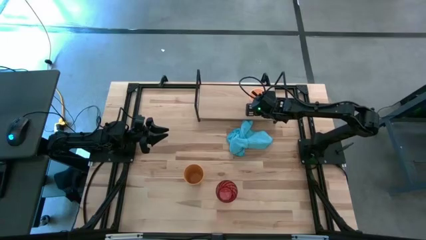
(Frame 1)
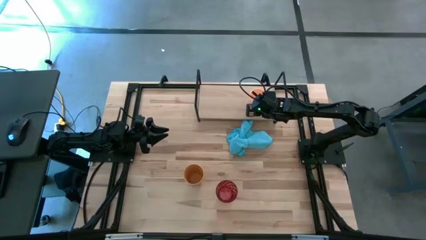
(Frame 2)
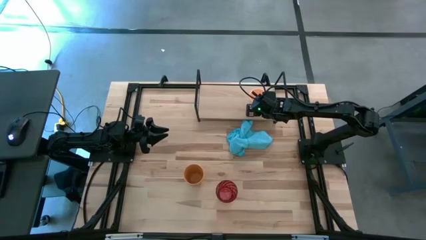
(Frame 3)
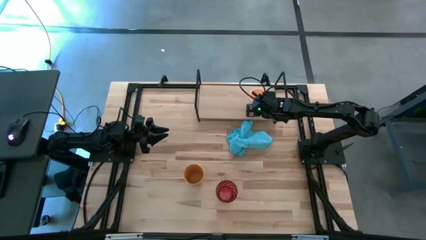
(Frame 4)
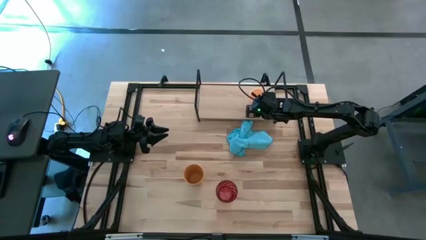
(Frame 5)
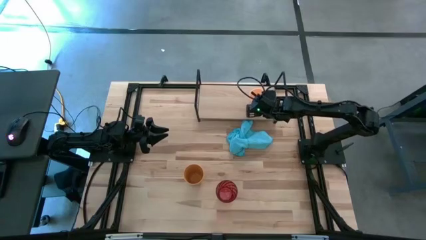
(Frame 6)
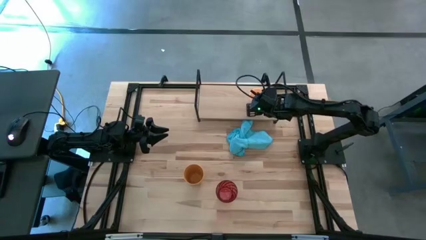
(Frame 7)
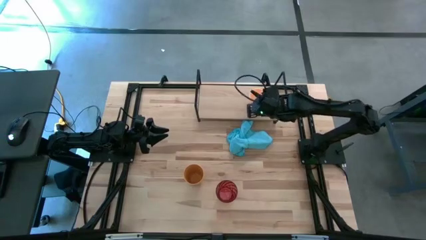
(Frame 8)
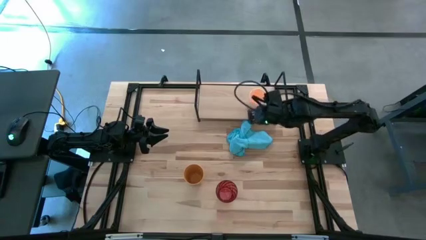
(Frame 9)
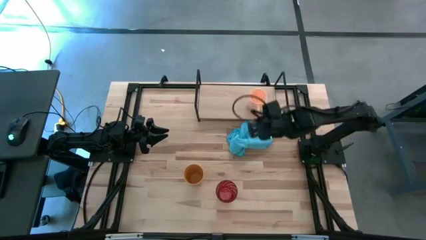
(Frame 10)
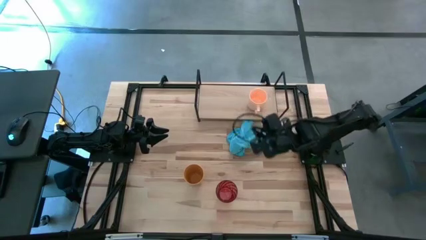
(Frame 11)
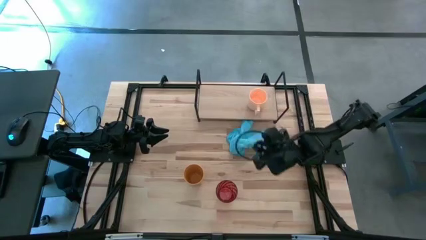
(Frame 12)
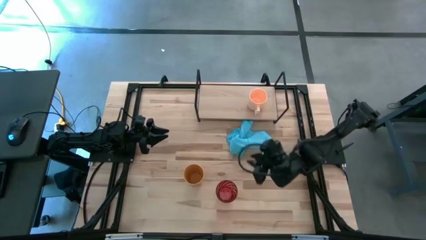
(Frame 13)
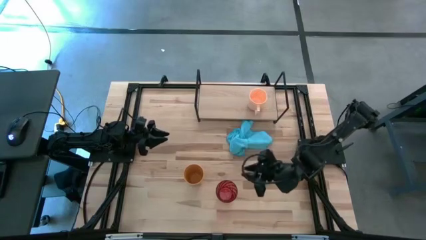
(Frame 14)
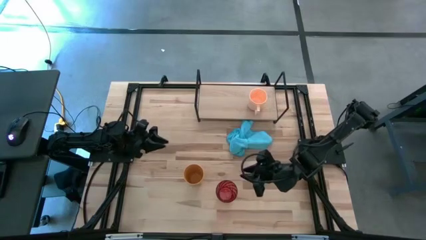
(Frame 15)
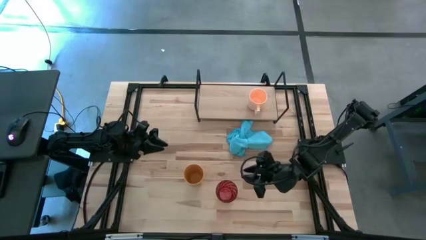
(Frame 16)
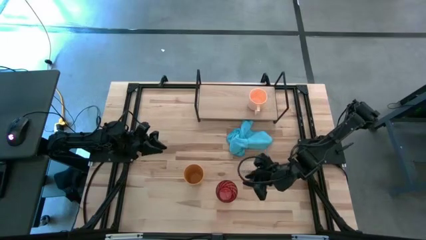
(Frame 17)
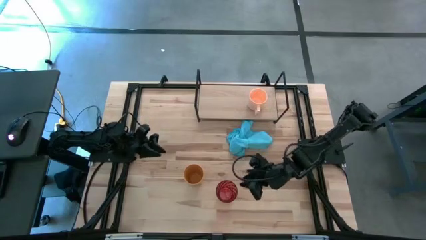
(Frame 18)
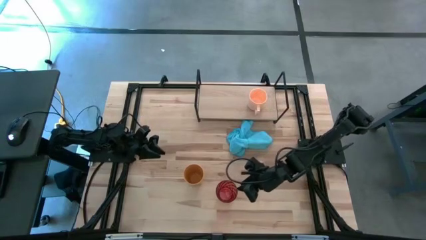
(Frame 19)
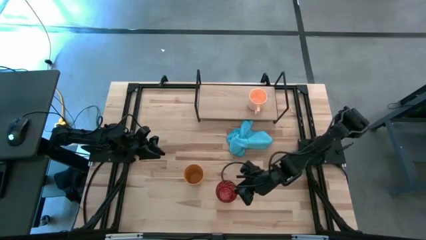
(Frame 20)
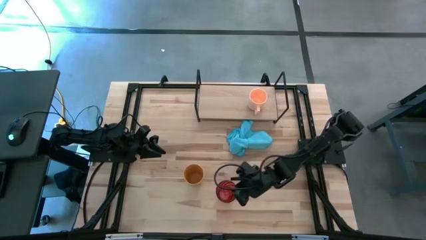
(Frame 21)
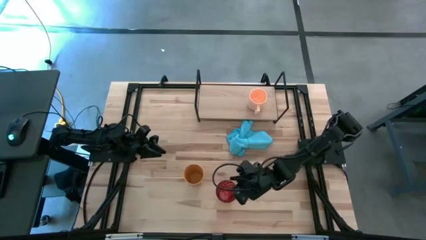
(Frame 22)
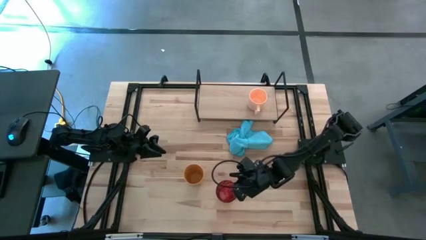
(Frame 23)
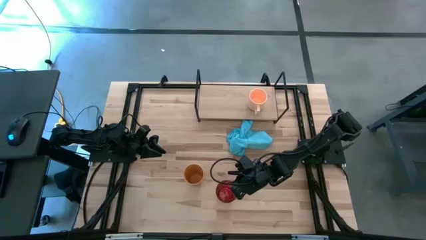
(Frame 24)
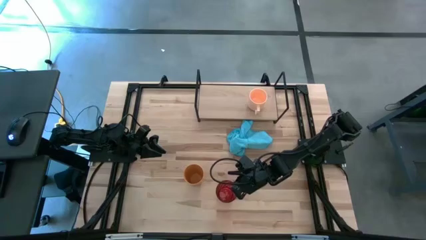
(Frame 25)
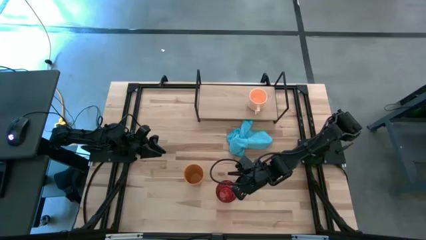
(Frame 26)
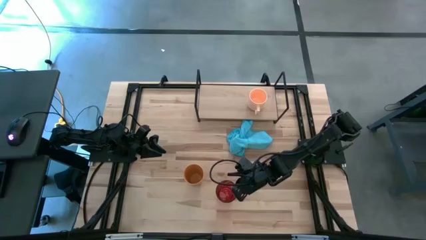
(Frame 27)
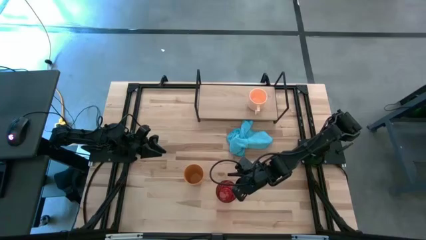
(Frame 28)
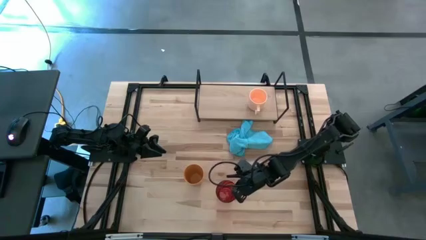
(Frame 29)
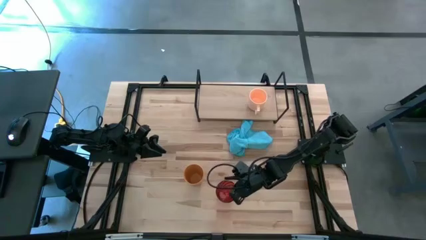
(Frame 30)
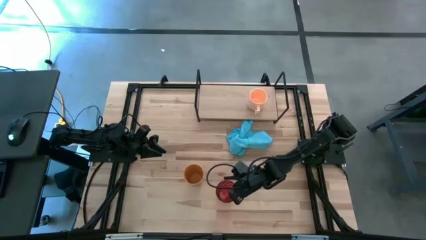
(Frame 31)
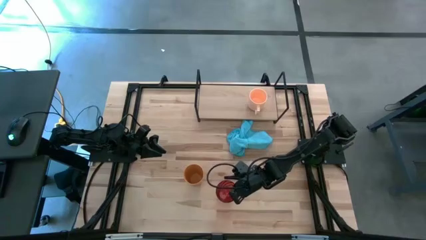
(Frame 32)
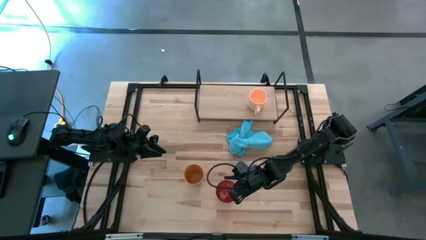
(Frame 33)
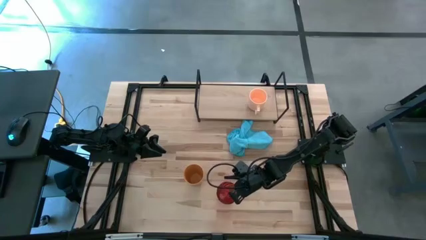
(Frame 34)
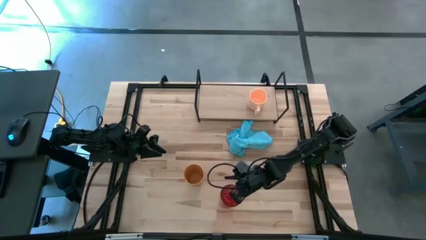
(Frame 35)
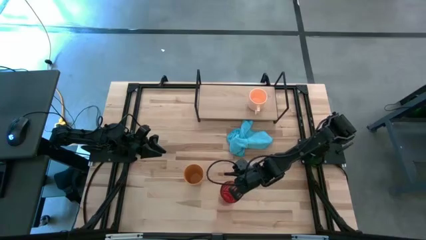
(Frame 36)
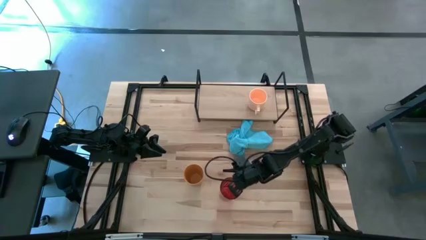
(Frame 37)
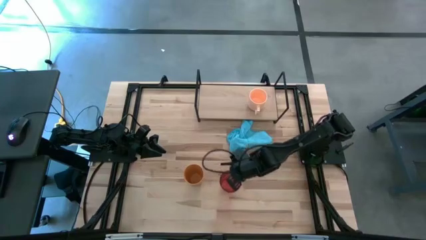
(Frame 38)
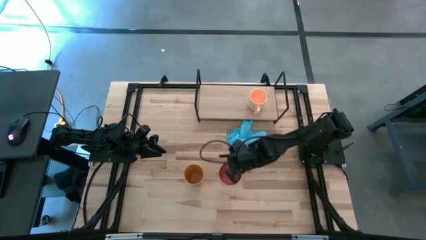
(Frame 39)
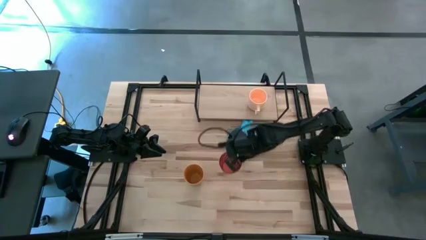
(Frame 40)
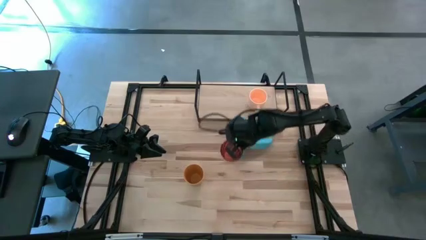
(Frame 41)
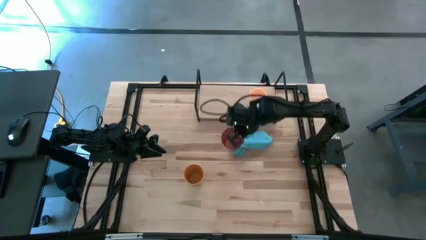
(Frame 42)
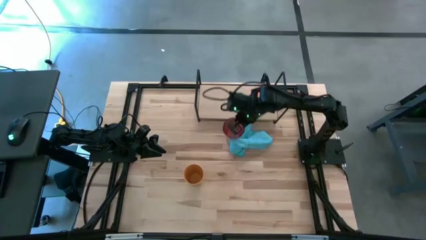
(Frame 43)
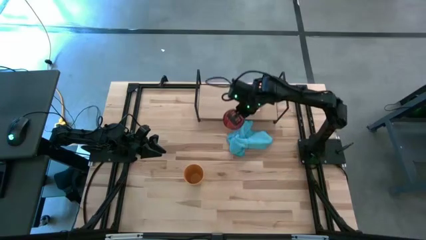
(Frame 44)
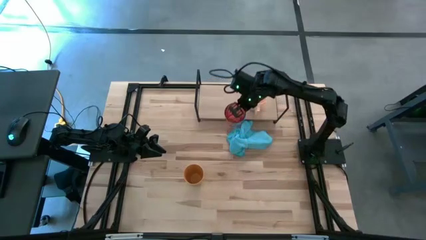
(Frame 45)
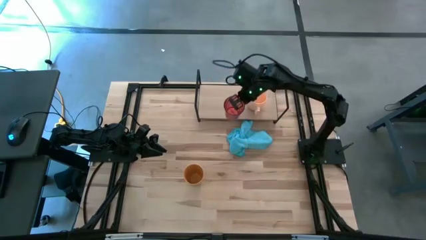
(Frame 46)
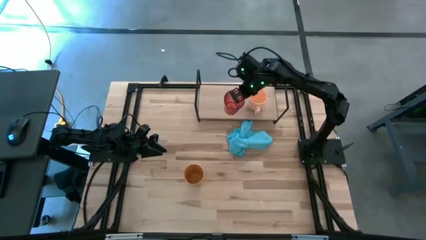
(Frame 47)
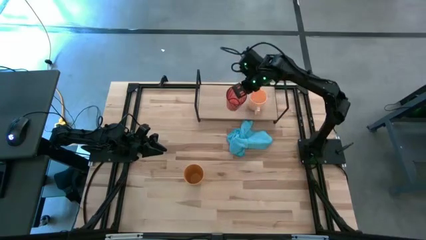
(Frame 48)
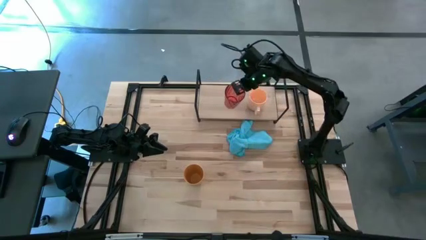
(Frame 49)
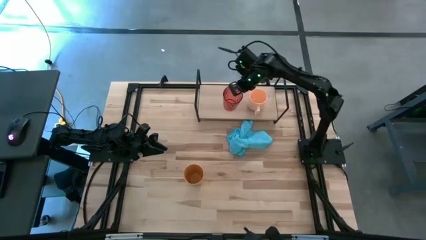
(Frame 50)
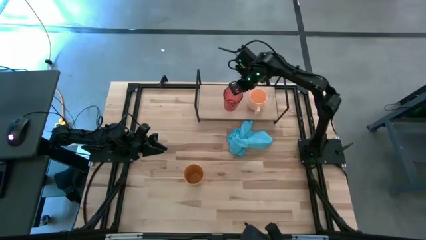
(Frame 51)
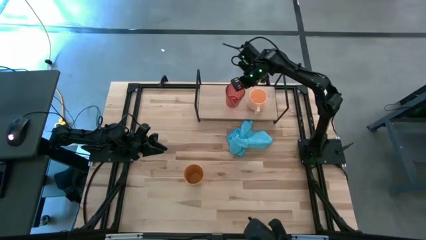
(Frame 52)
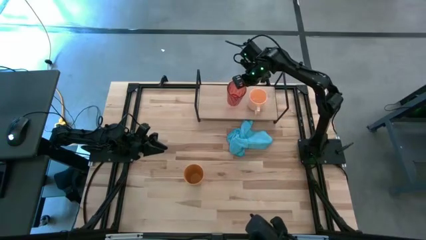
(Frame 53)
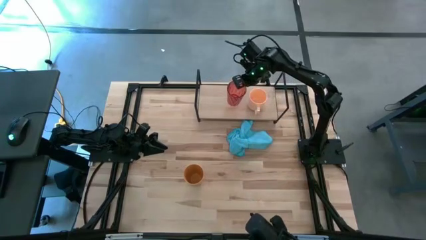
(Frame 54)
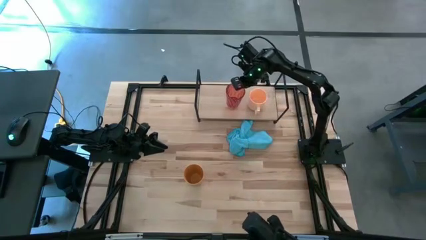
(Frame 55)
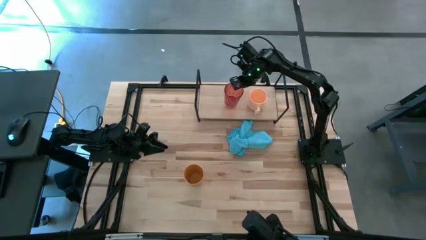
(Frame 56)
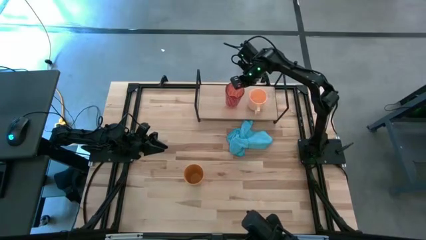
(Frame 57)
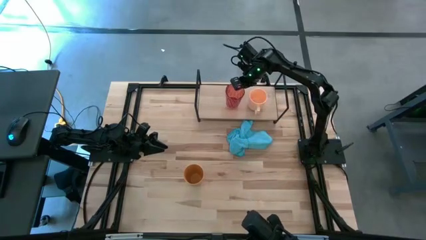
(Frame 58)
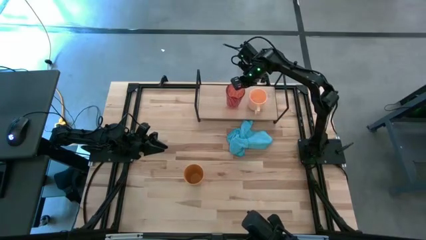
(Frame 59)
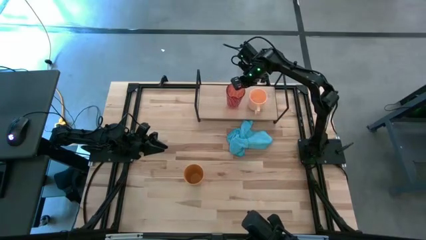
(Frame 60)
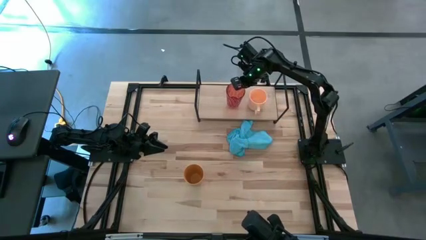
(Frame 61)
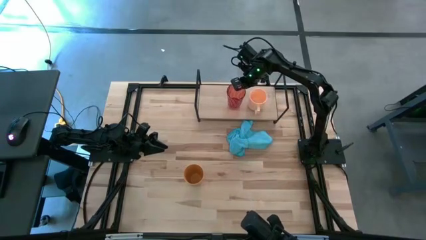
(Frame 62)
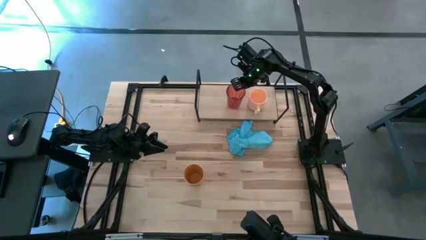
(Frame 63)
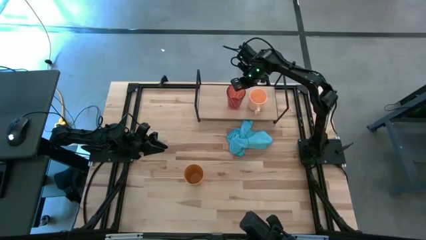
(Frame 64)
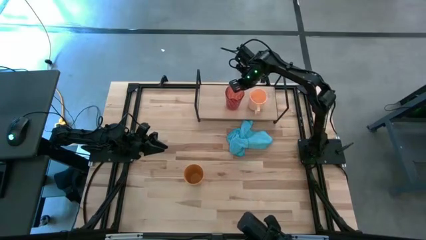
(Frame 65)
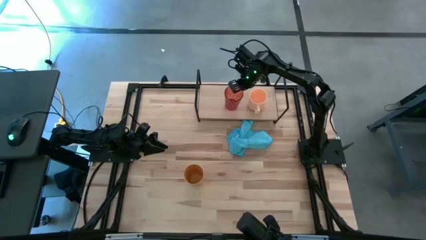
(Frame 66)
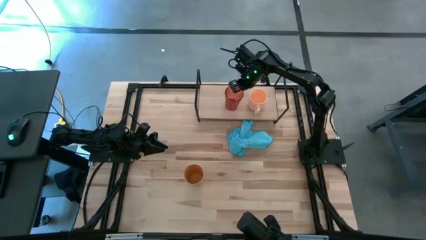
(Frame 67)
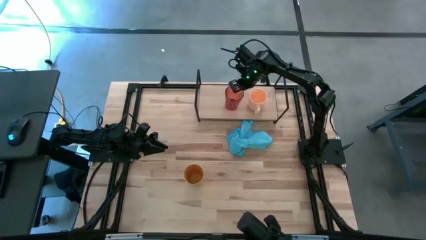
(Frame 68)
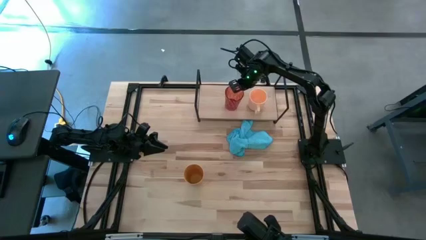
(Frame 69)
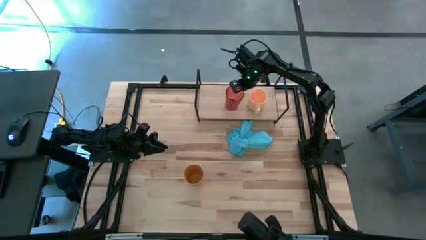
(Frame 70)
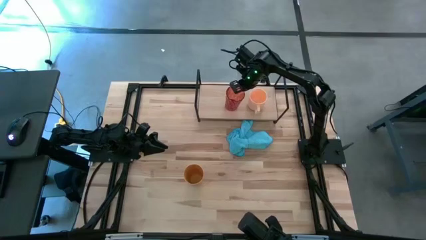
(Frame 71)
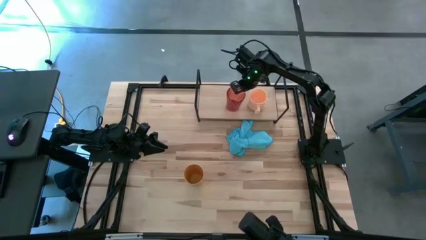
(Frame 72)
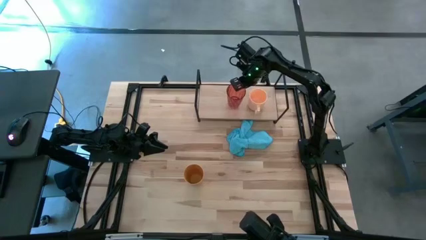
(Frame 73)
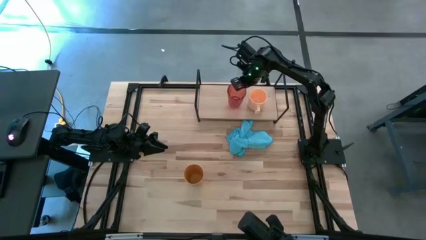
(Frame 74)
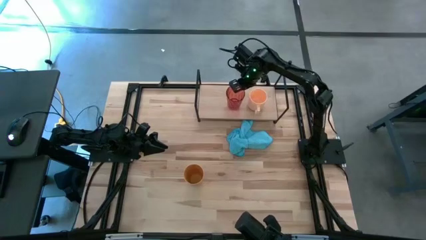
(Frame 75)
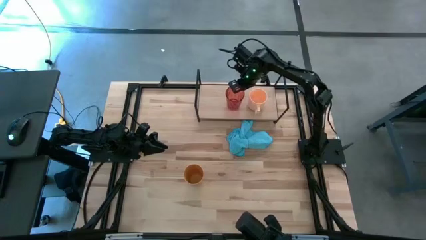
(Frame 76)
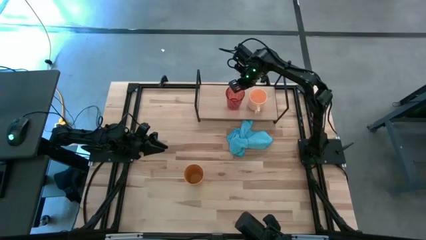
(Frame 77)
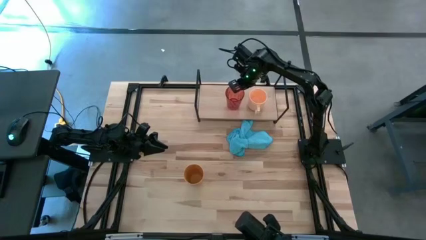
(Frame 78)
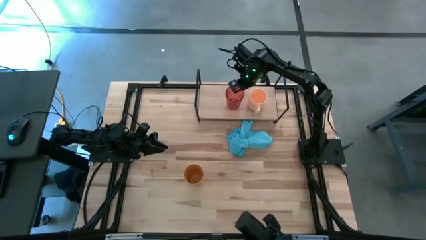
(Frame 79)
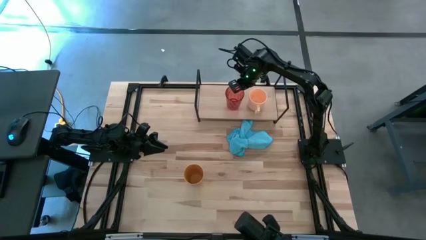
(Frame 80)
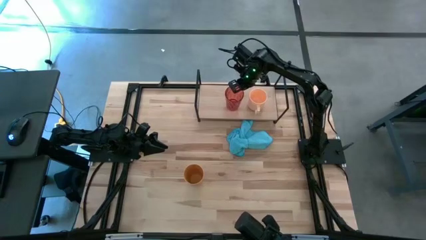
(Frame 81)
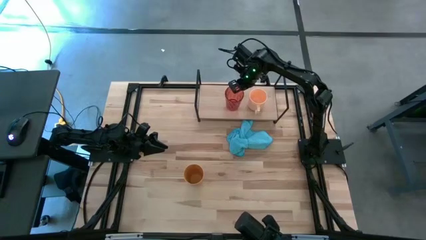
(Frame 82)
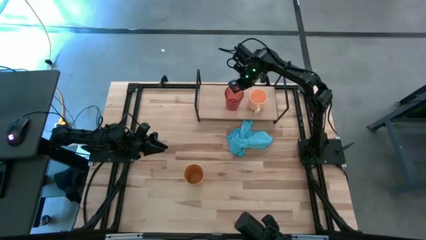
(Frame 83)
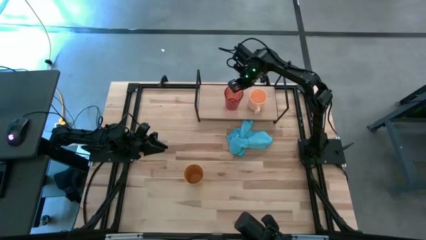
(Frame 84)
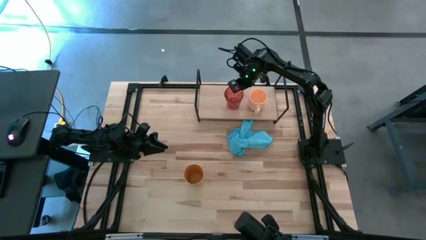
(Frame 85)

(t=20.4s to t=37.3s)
Task: Stack small to large cups/mugs on shelf
Put the red cup on the shelf
